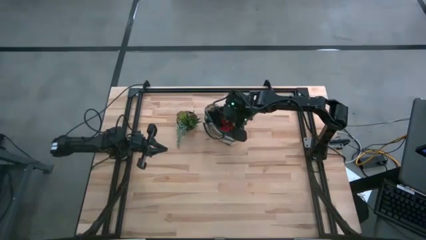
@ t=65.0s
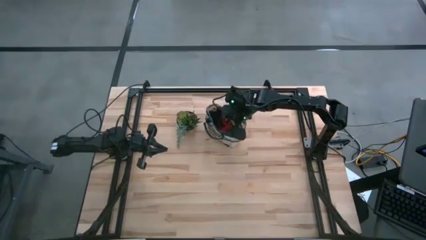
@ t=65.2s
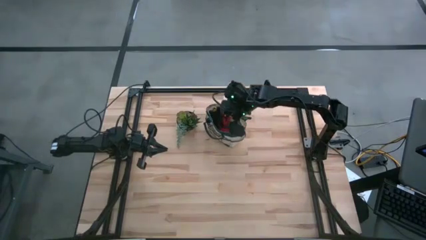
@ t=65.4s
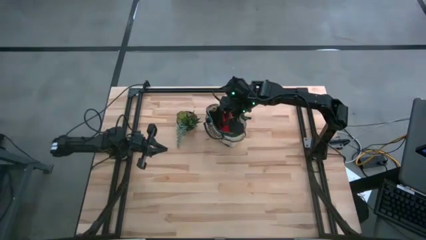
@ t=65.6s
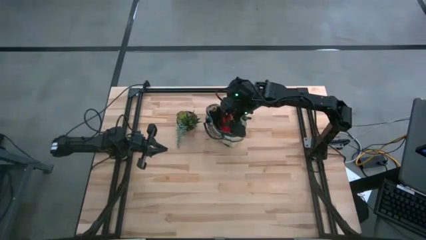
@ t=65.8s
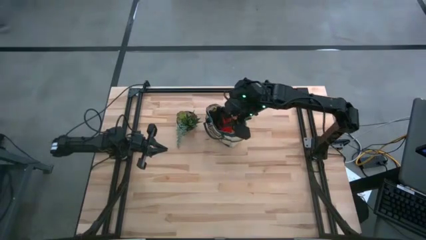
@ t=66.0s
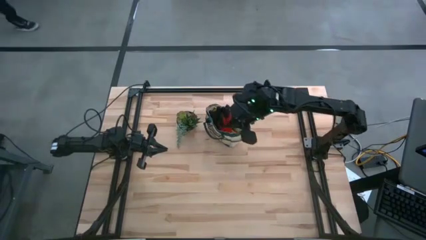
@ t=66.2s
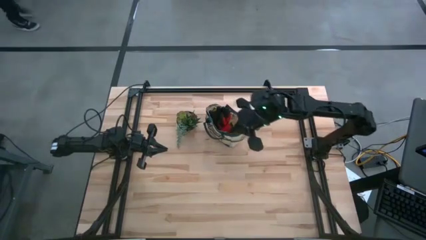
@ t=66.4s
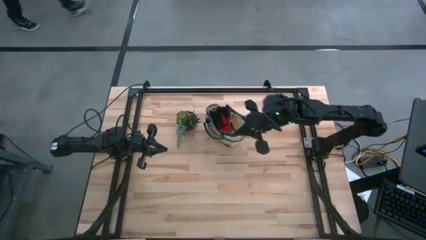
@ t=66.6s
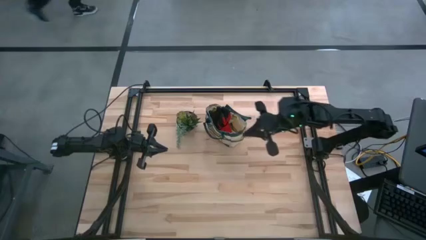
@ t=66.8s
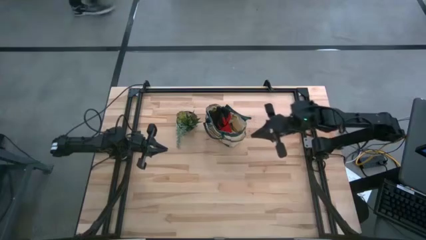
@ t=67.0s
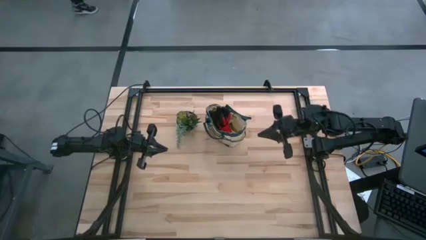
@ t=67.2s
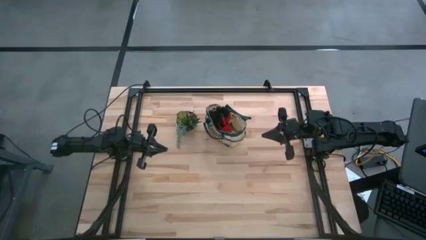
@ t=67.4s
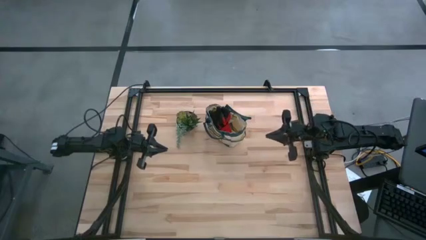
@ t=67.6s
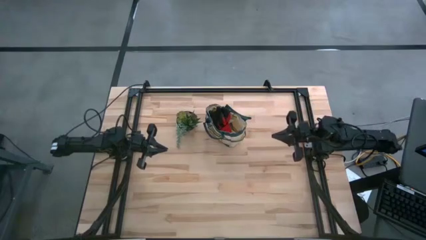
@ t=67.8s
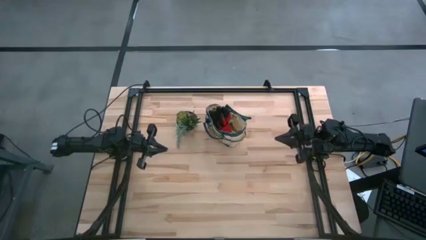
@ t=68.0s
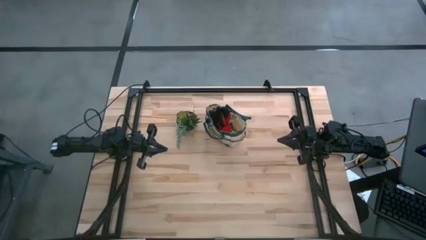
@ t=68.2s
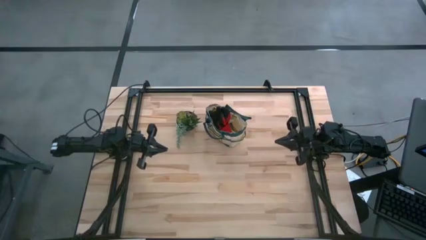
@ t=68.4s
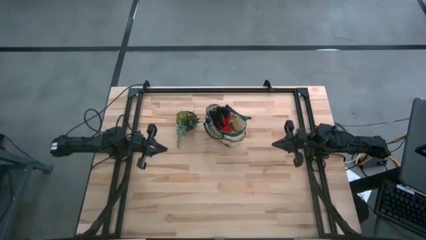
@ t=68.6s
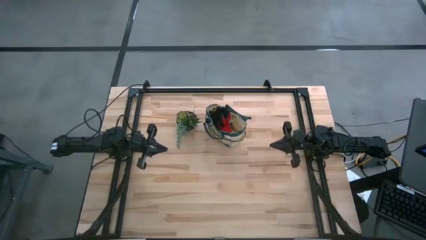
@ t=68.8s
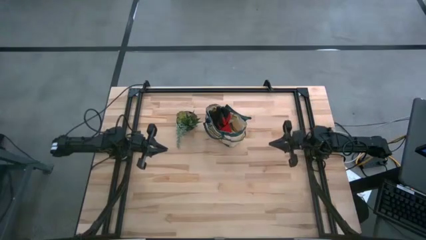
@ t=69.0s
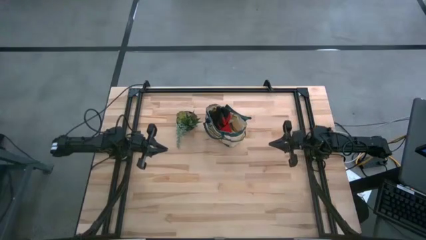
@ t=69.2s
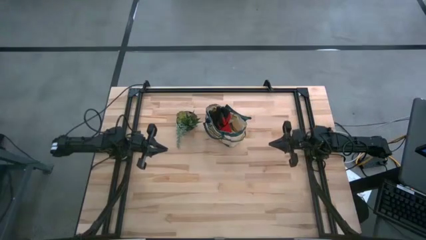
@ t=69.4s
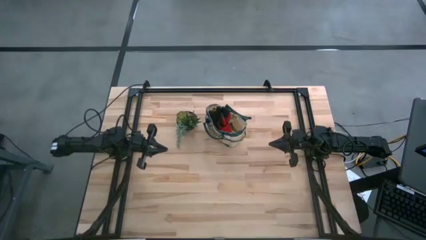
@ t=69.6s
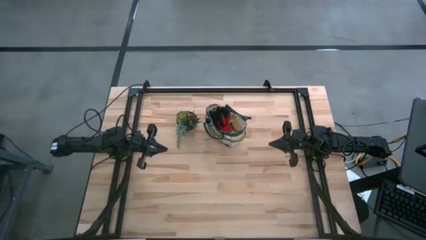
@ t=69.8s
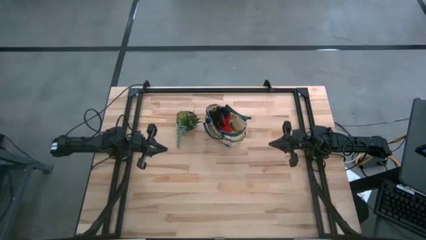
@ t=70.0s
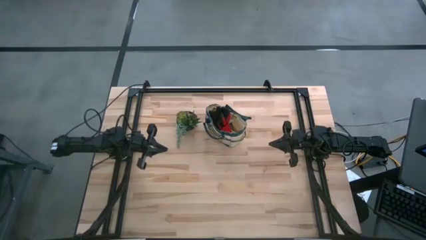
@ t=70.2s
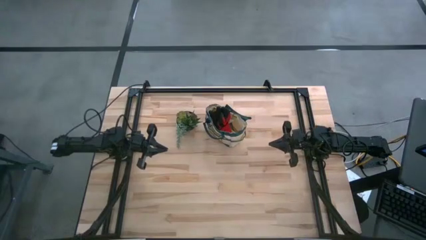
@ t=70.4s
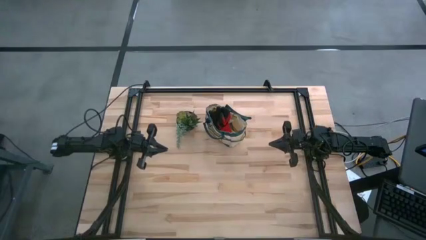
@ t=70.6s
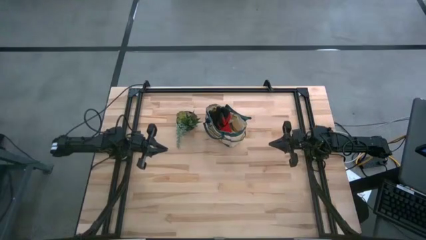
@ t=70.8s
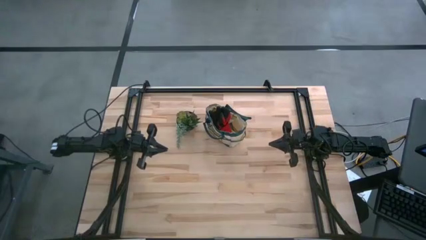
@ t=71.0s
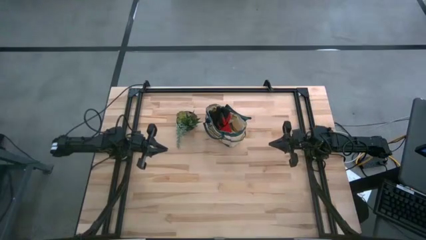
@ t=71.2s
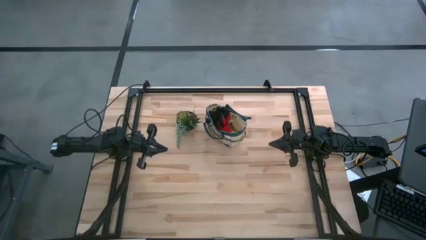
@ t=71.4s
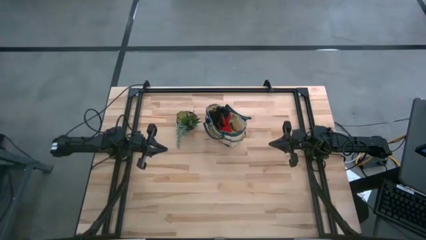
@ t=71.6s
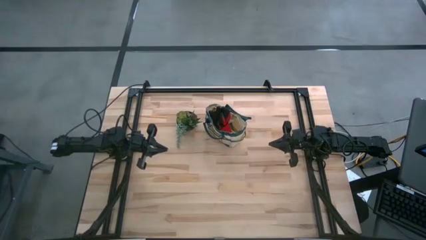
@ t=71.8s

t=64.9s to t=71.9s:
Task: Pick & Place Garden tools in Gardening bag
Return to Home Position

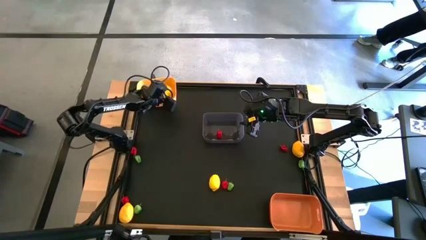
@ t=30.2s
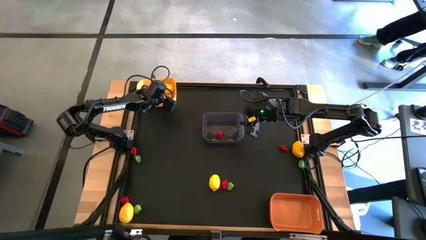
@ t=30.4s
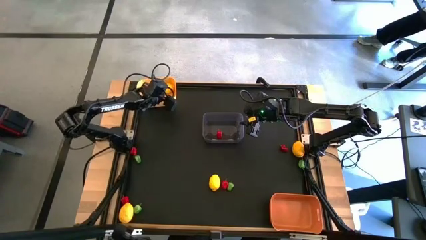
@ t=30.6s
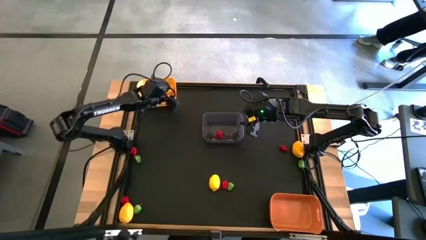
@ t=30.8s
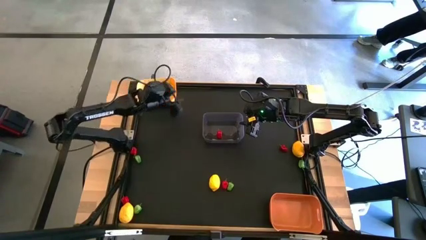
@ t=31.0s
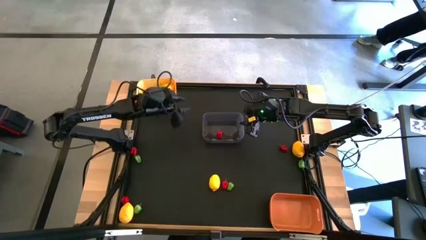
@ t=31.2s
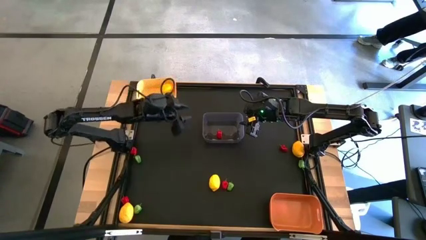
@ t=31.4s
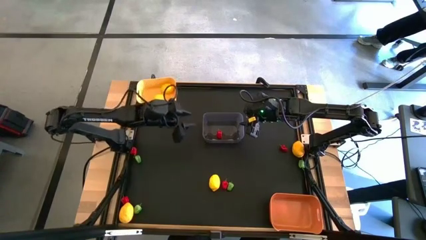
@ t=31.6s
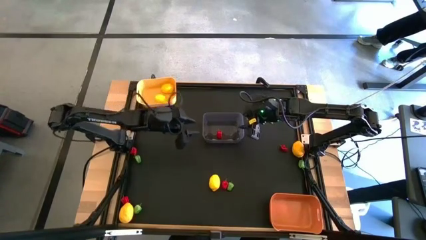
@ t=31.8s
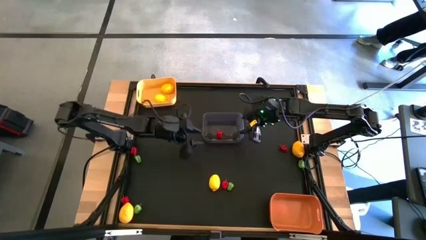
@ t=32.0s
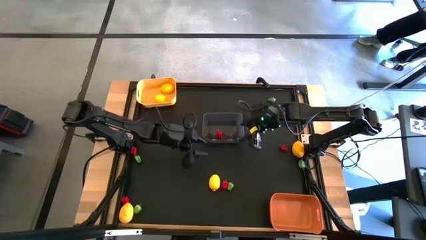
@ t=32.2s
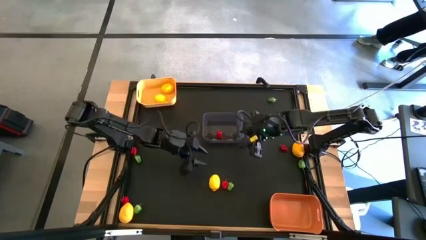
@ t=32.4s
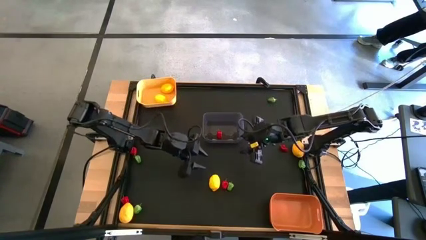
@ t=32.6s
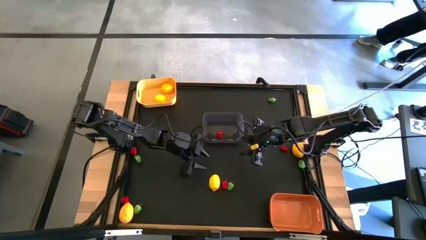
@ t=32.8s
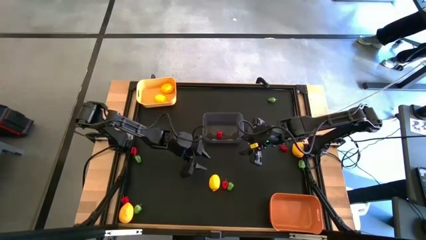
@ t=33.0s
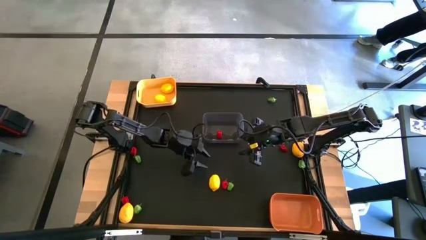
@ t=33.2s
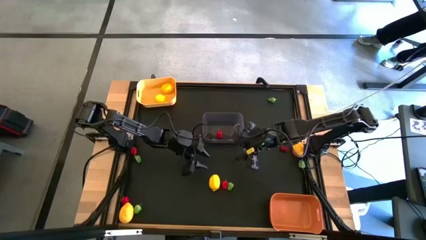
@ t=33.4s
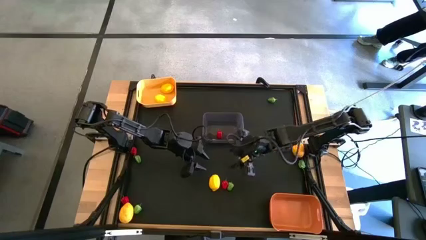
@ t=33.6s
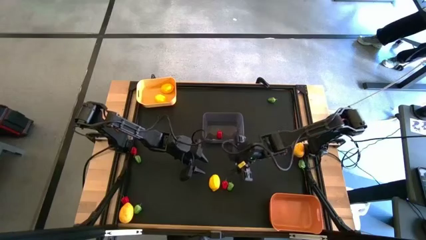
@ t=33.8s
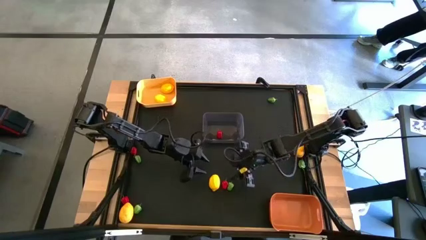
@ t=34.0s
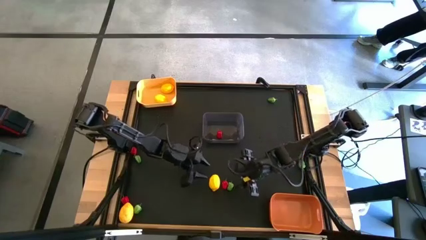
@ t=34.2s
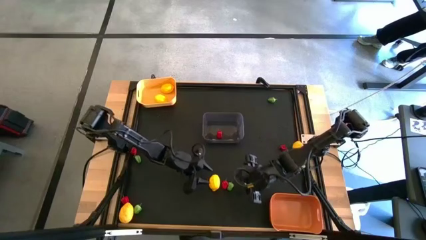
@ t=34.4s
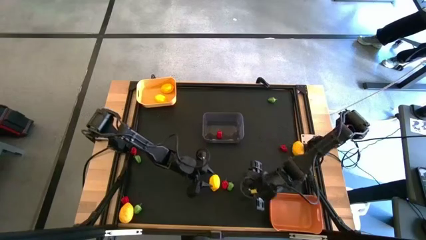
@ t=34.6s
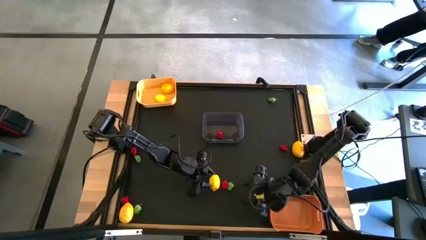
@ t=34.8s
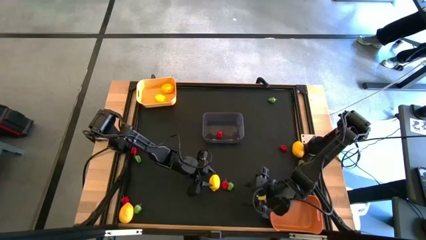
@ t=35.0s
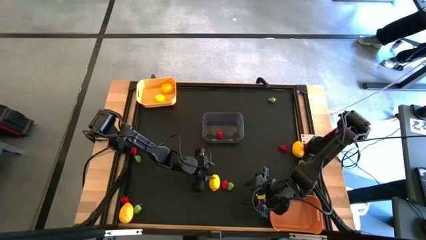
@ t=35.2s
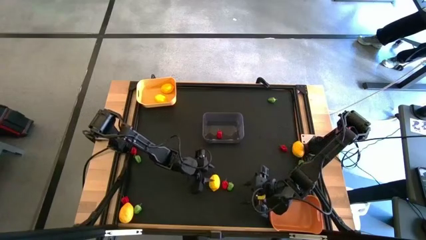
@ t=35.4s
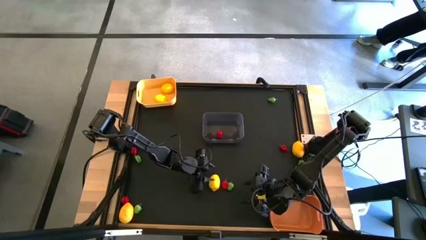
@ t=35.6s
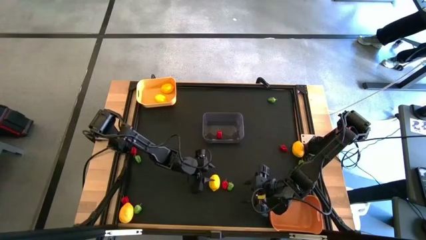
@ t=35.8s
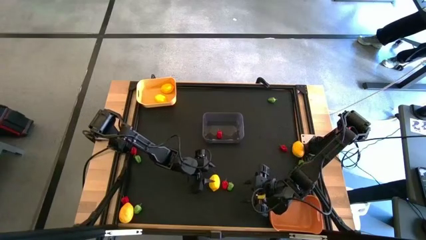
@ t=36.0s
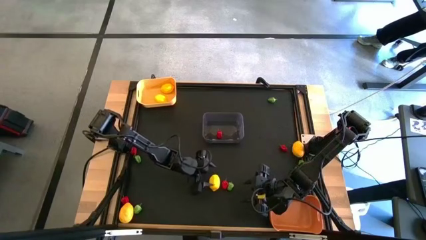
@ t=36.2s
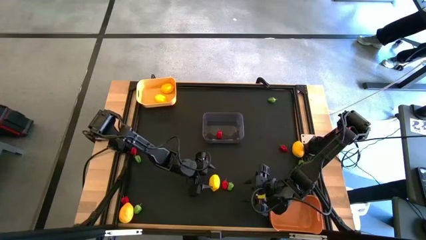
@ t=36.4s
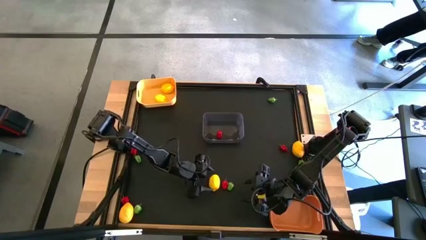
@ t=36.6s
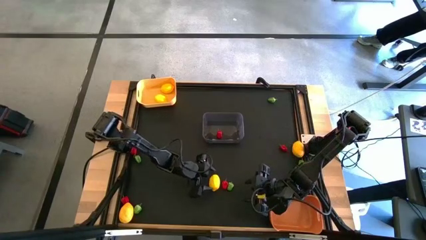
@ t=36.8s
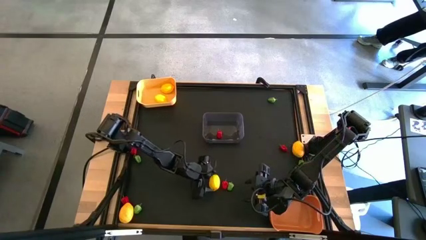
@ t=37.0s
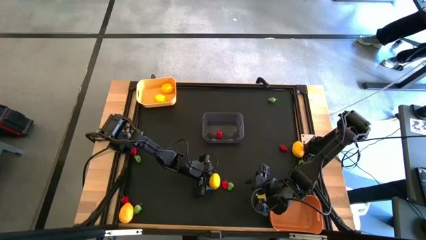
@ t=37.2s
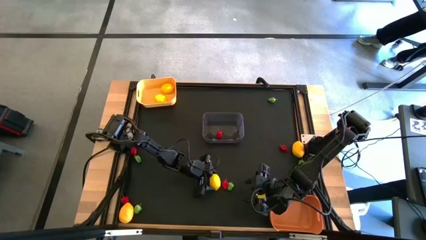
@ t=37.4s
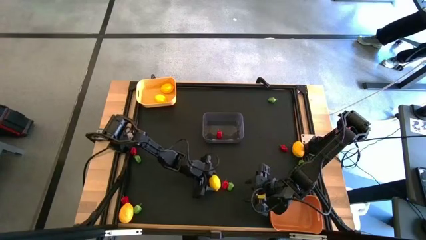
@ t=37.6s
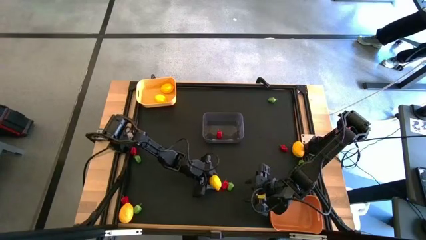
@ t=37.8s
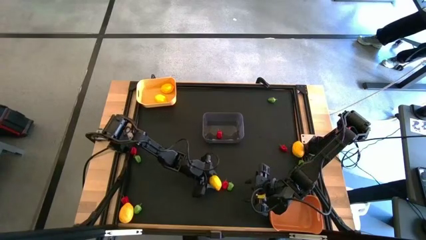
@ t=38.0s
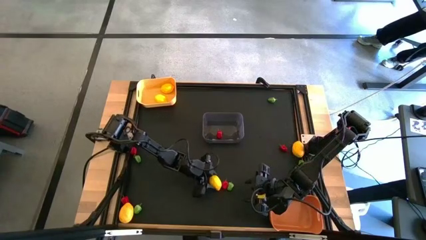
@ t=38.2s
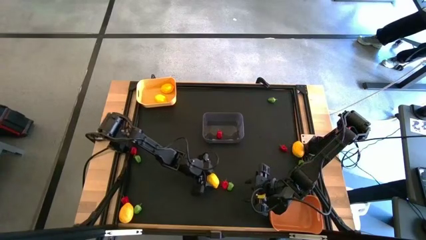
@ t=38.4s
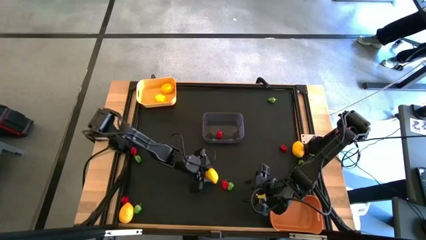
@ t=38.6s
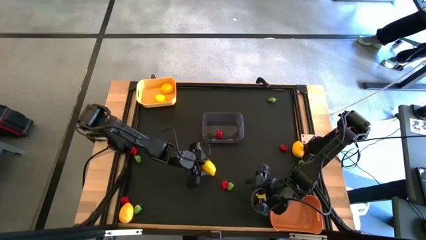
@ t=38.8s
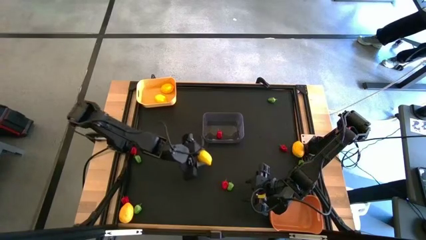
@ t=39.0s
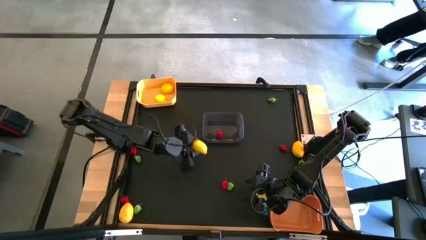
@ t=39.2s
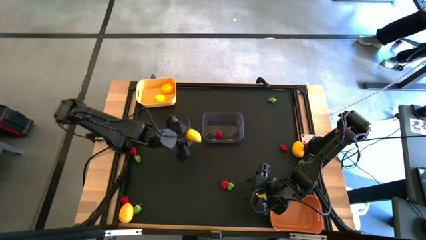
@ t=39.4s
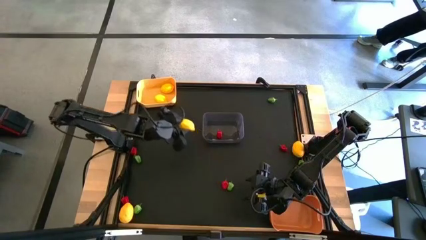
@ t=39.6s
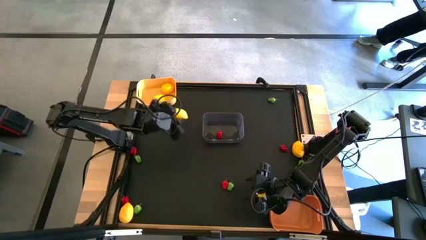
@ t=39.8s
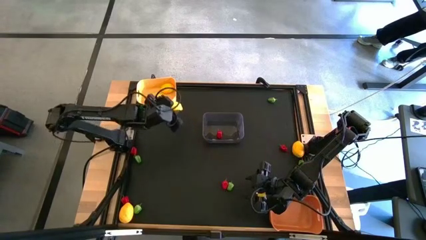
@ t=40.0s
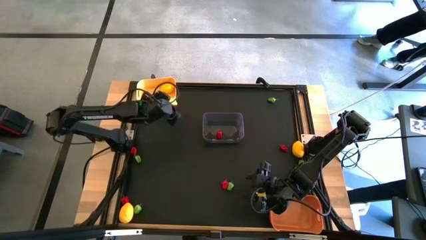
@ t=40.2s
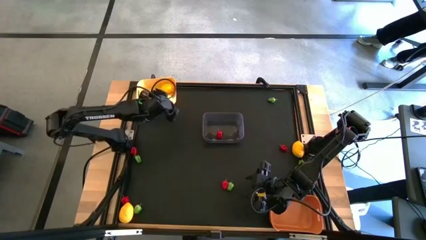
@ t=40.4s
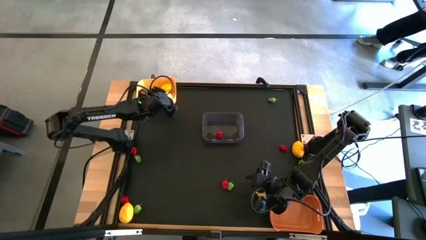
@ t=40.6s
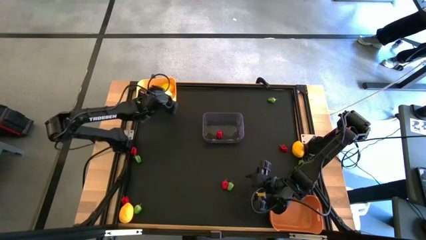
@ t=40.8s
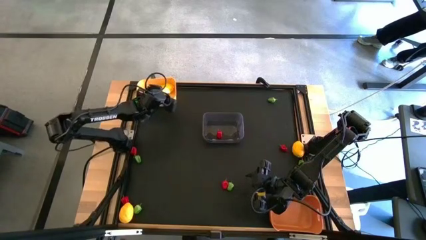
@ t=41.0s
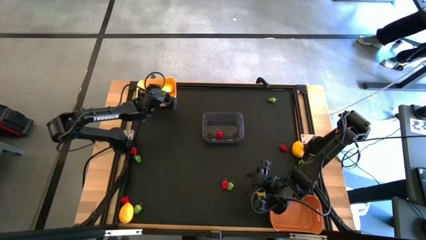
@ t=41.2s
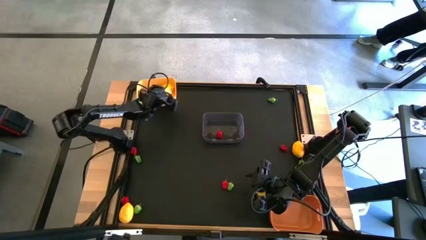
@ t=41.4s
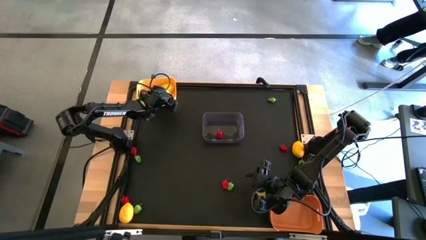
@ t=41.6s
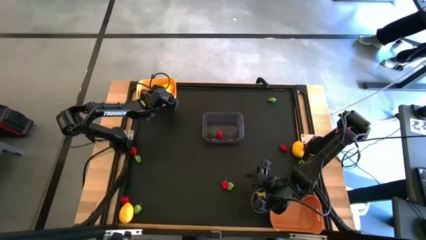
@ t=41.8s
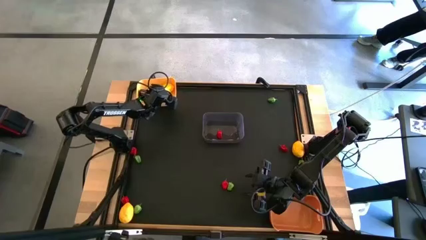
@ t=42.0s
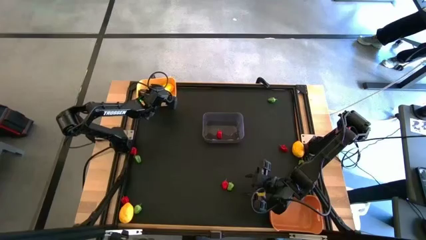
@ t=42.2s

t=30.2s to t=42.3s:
Task: Sort produce into baskets
Put the yellow lemon into the yellow bin
